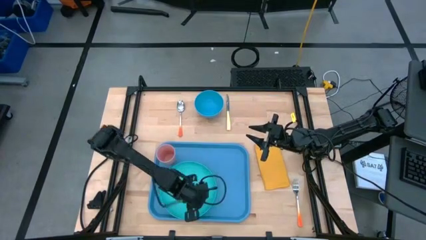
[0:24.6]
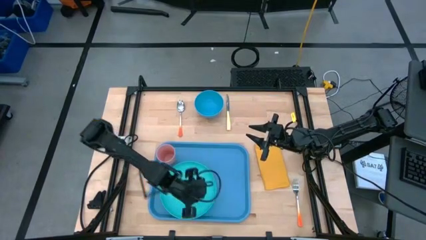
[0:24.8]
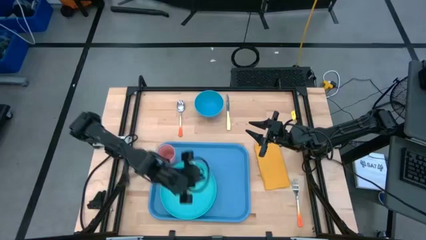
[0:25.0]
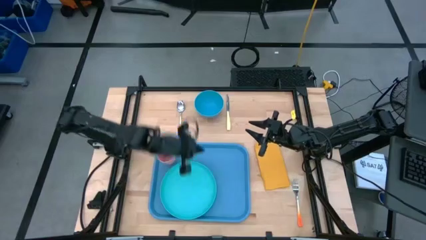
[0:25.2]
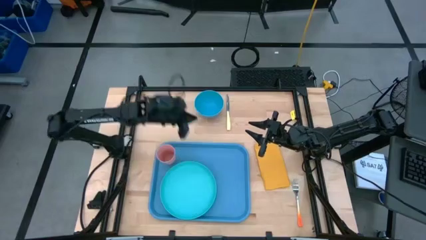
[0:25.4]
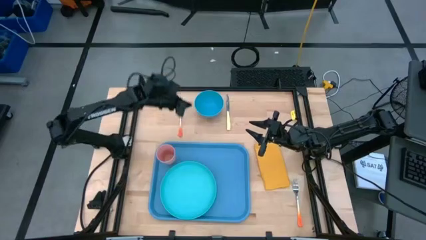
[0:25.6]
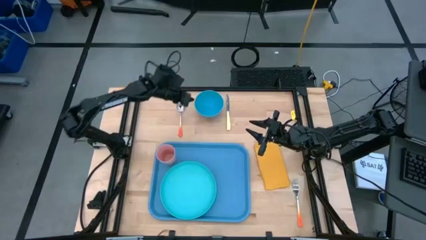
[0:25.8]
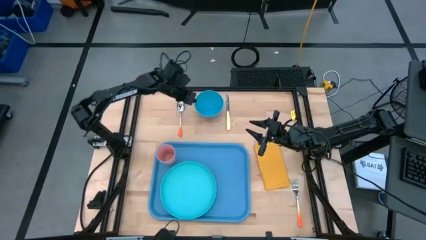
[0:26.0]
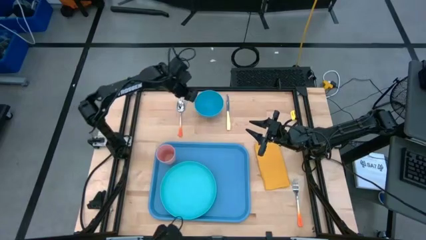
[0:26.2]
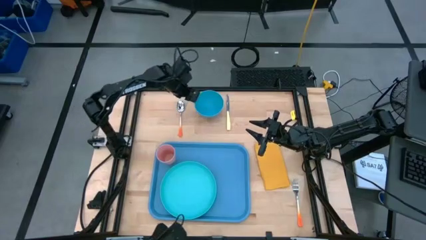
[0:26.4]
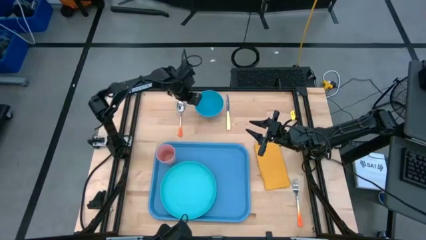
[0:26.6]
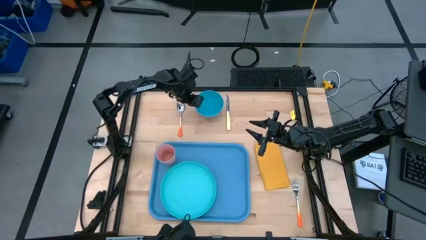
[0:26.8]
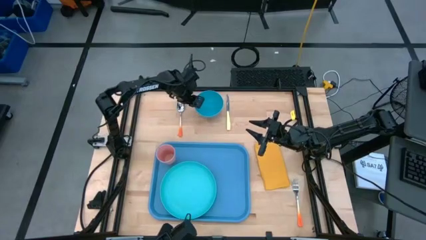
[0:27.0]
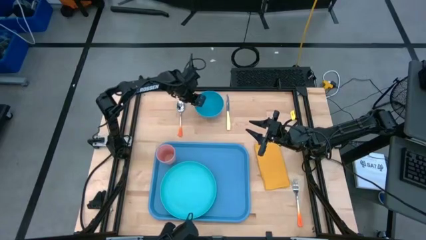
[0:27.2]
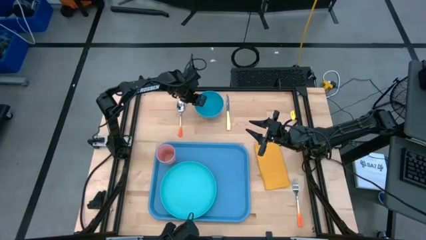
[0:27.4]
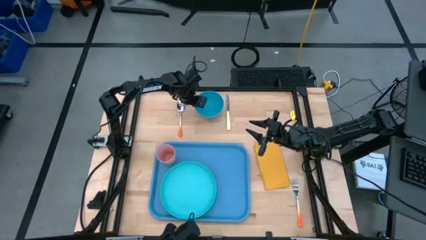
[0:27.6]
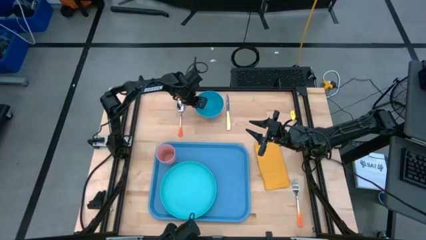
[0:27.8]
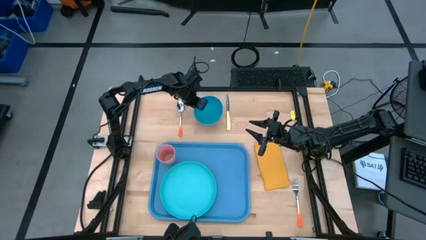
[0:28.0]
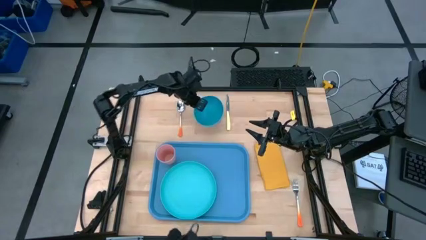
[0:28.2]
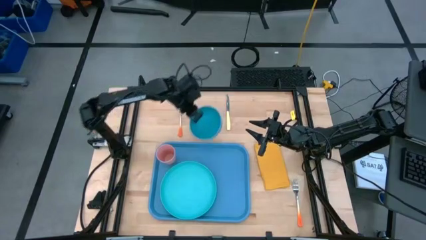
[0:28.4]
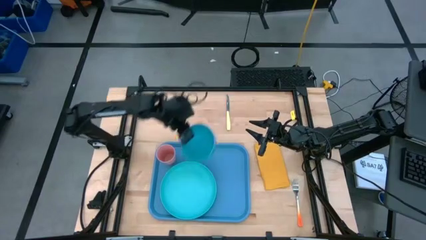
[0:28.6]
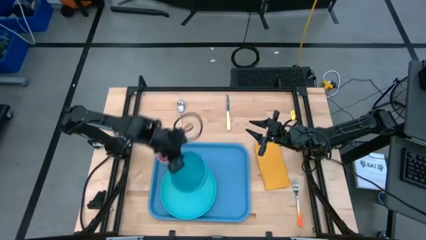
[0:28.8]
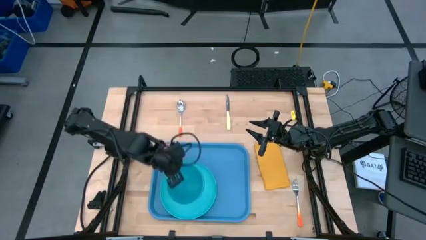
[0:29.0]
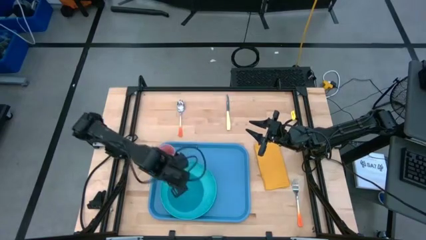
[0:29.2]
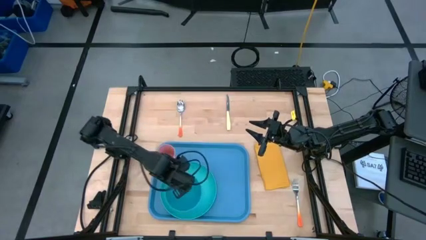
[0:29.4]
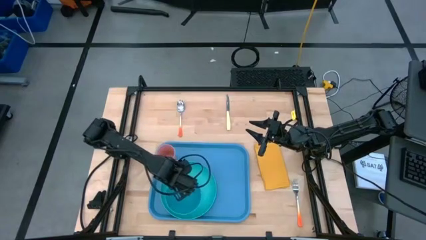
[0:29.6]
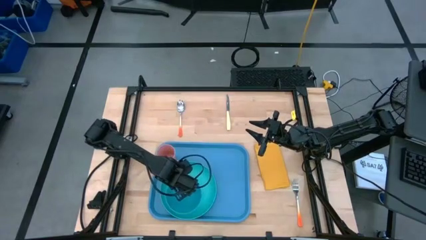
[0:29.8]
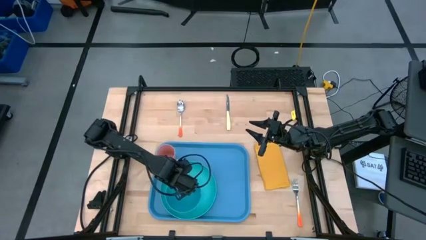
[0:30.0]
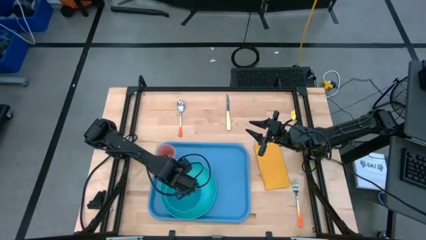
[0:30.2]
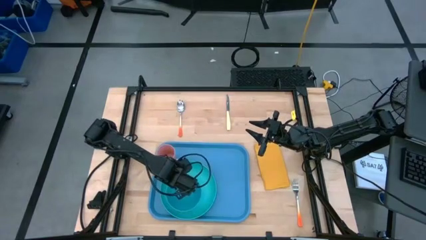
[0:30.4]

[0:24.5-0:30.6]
Task: Set up tray
Put the blue bowl on top of the light blue plate

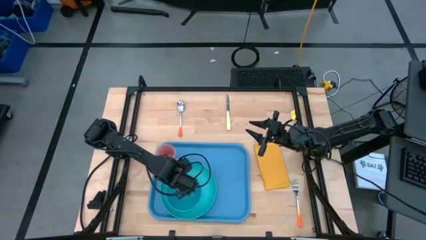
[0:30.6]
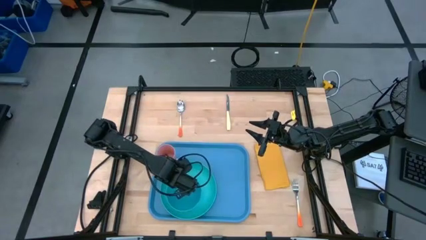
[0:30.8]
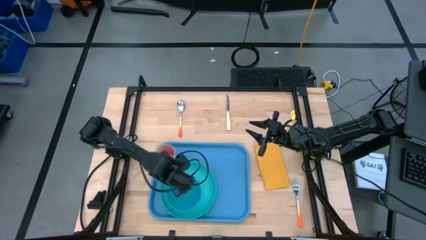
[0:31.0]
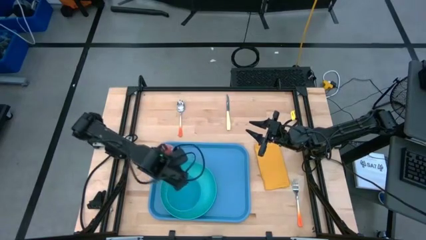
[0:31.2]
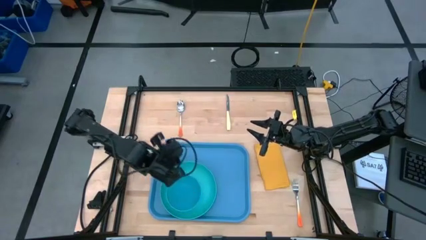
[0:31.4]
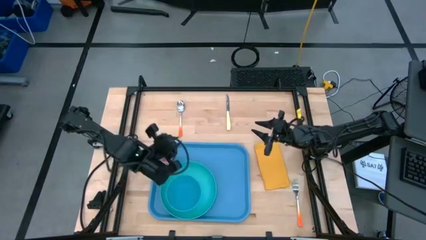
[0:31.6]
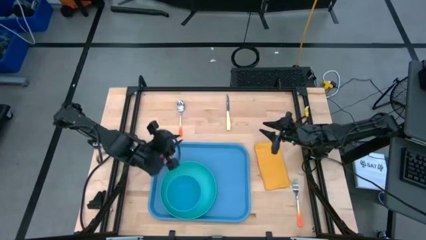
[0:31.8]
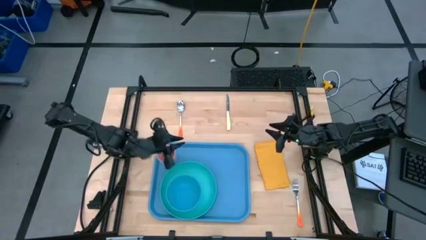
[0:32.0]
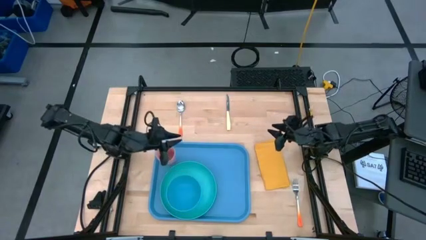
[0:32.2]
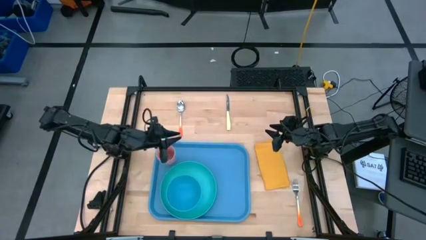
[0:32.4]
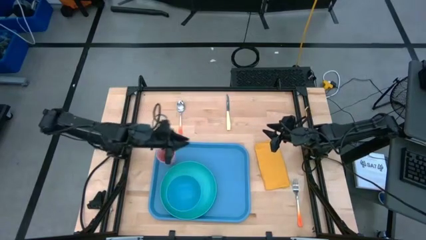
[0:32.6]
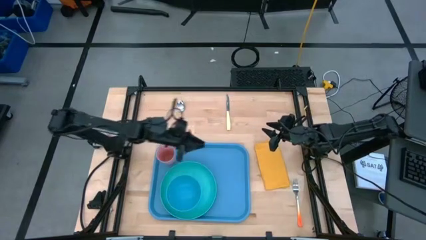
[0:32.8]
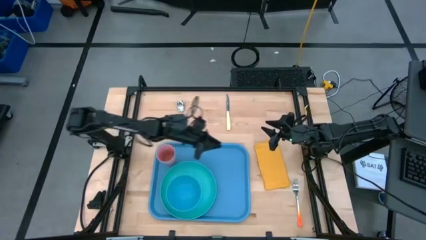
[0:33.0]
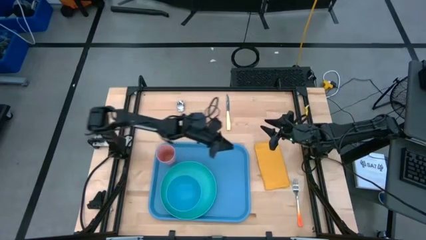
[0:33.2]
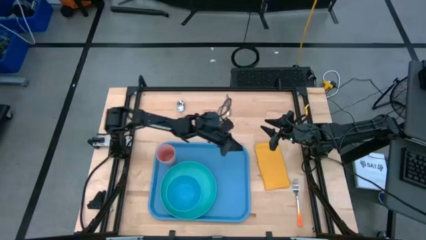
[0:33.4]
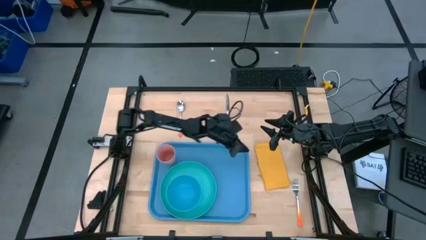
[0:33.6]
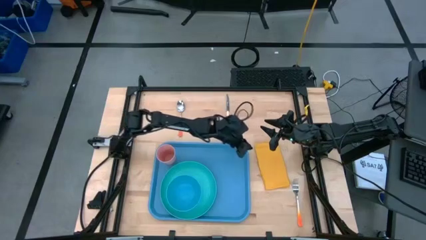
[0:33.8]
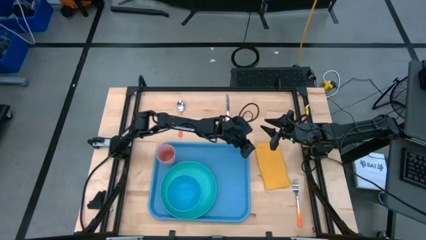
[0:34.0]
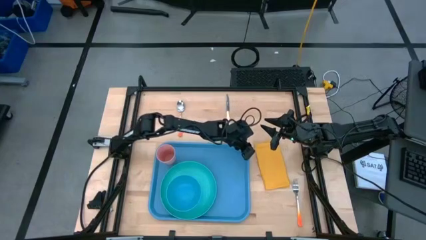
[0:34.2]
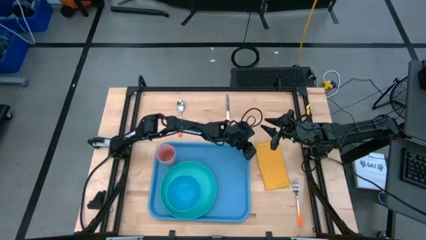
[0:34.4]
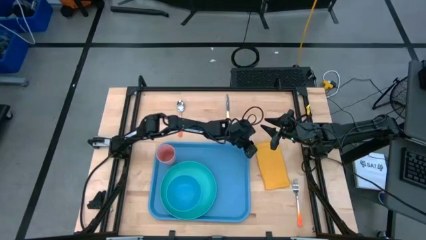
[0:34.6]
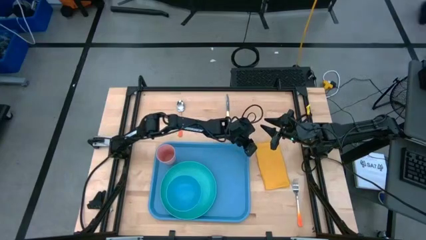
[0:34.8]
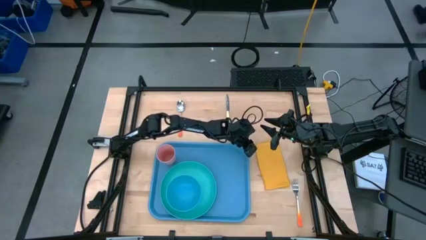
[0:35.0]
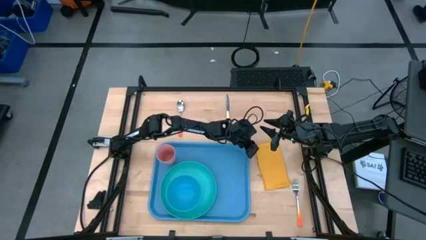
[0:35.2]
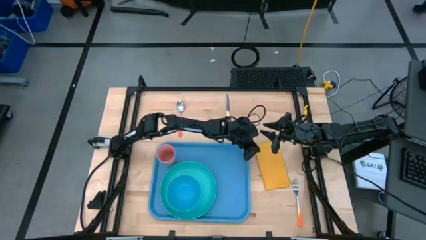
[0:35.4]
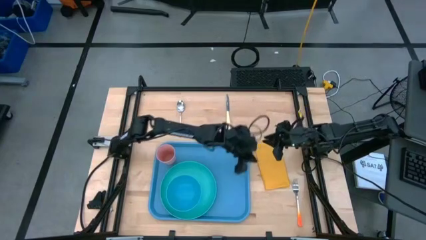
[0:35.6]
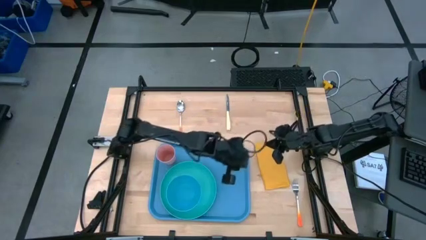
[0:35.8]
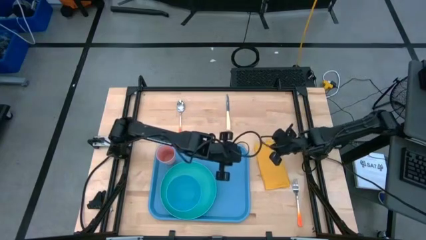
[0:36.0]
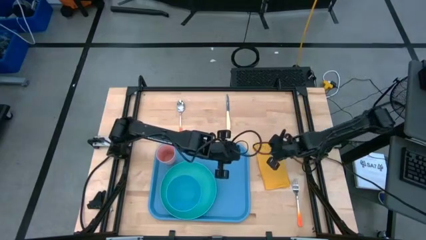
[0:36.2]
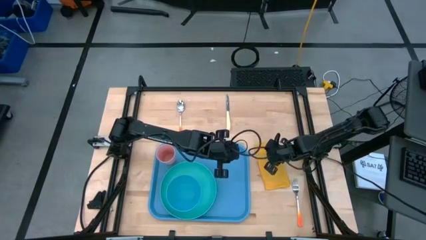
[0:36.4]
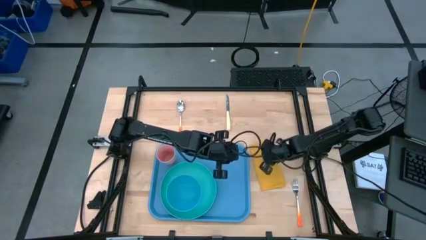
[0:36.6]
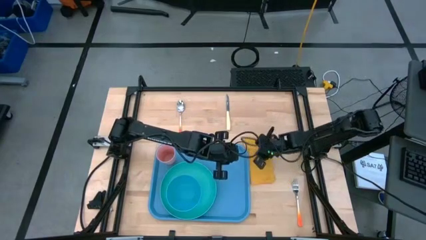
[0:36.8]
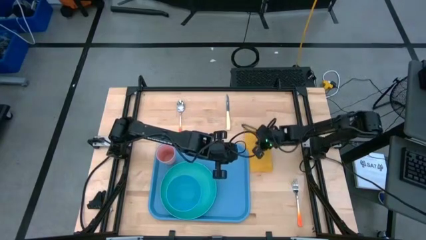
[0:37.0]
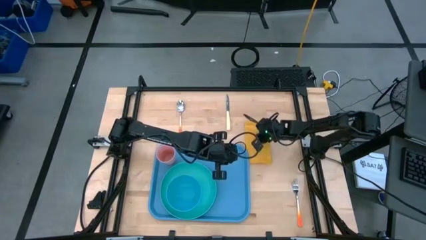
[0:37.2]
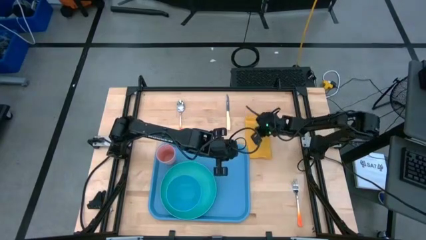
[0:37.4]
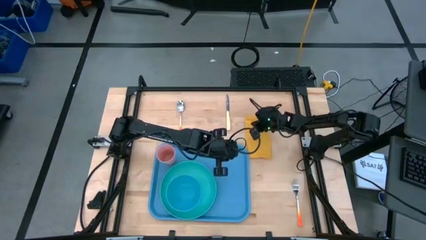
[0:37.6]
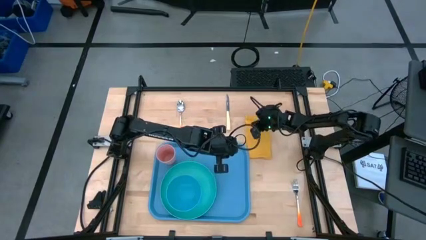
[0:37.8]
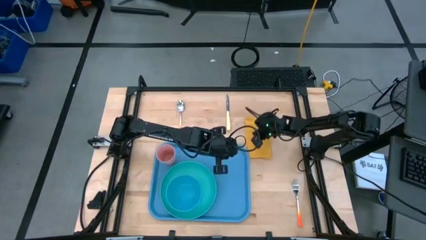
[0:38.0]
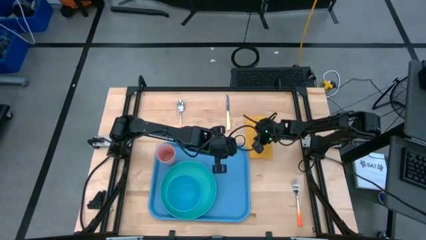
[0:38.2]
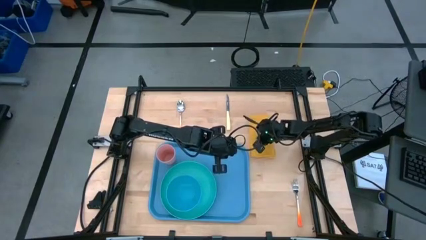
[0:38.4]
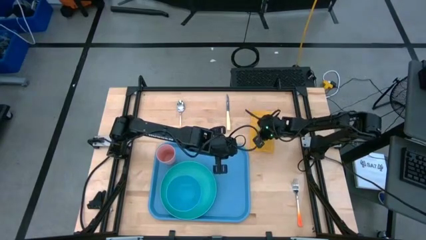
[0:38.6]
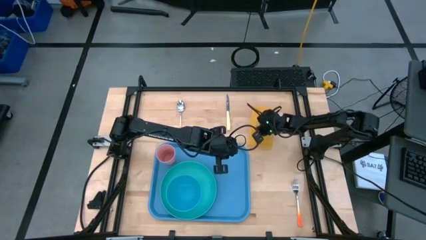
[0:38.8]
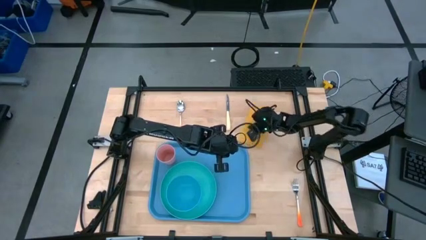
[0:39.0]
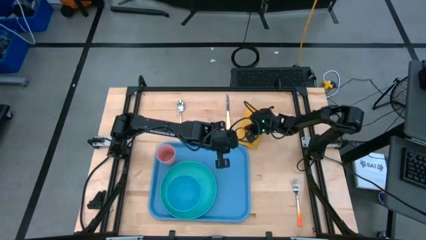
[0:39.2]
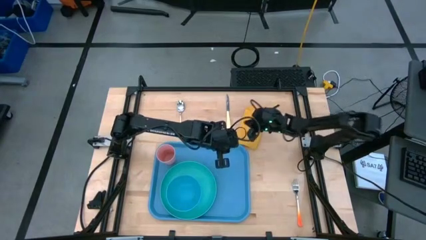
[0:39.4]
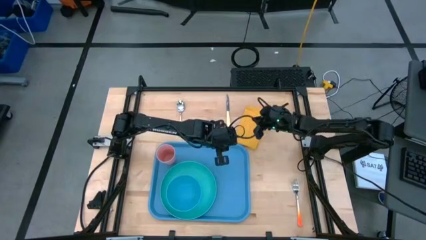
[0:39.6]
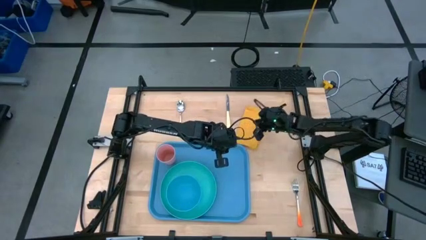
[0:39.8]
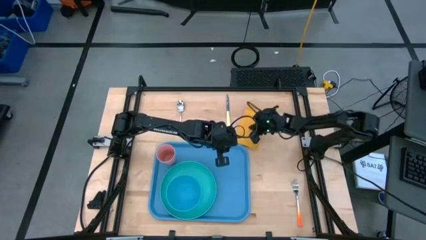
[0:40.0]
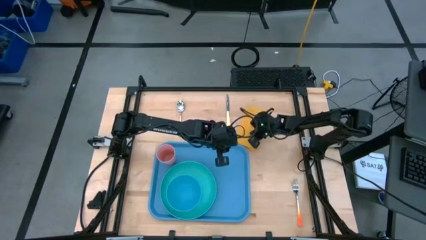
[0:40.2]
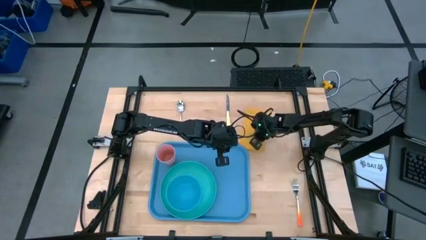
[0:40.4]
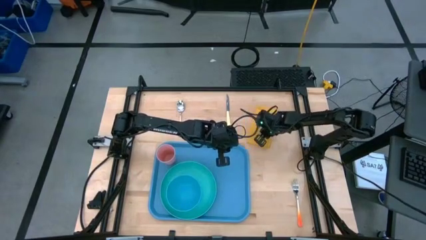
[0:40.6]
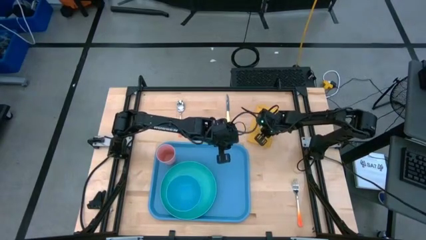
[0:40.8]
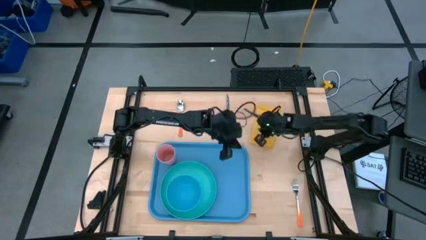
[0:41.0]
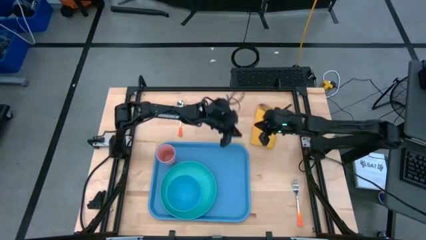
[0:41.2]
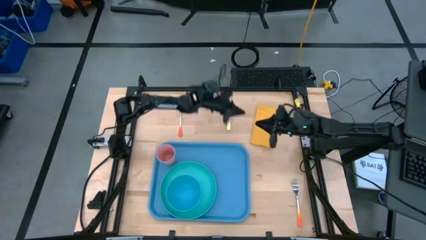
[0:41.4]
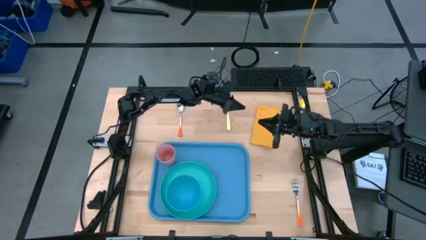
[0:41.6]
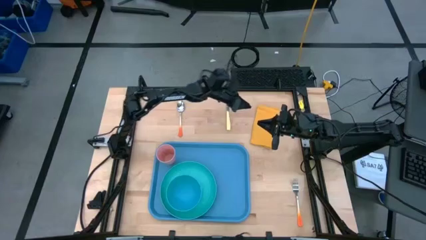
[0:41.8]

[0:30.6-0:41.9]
Put the yellow napkin to the right of the light blue plate on the blue serving tray
